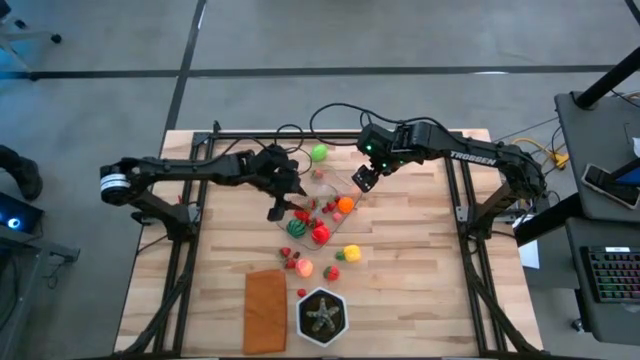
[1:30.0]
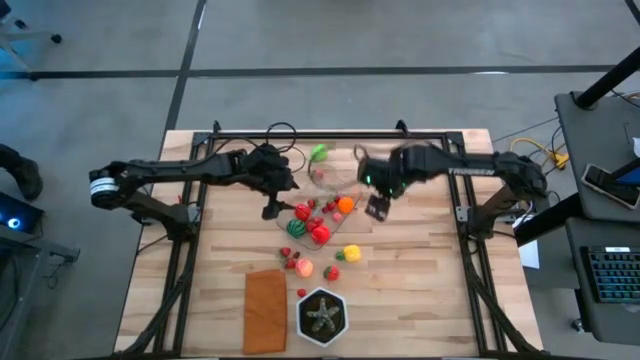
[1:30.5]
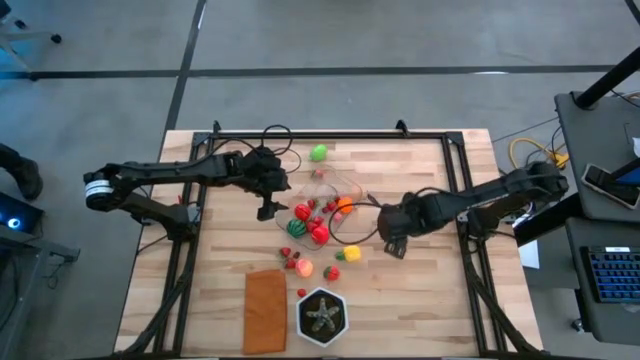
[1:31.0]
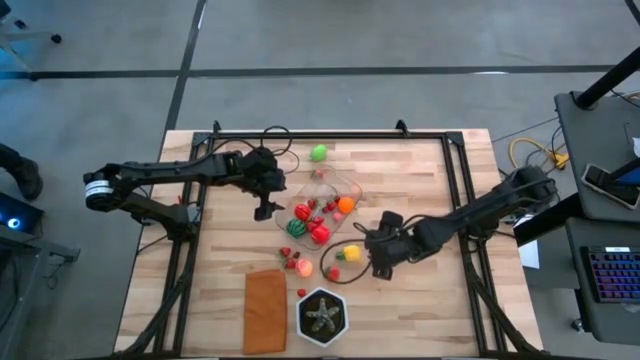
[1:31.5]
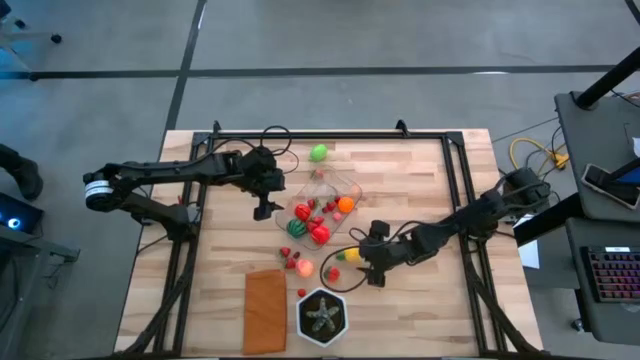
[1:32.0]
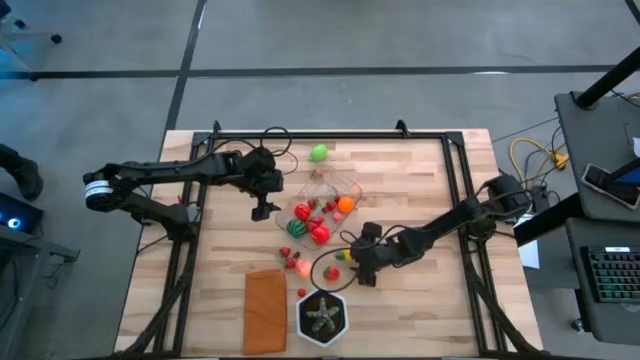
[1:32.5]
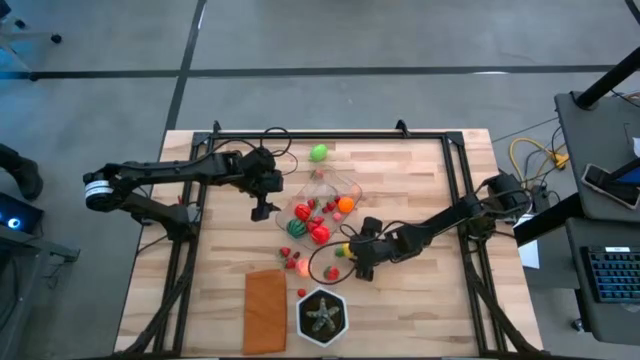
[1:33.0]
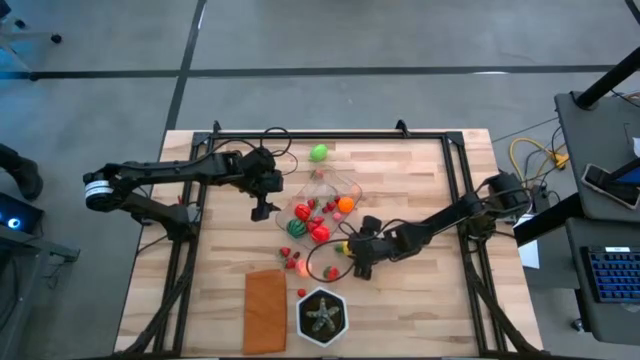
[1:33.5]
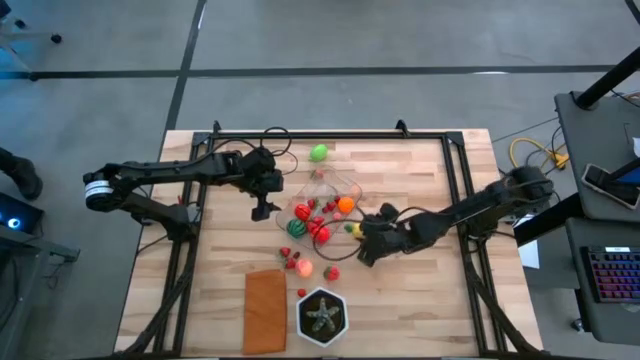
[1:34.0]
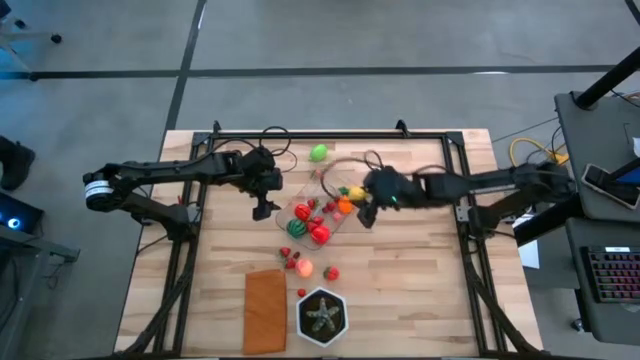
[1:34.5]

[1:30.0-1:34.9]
Task: Pick and placing Produce into tupperware
Put the yellow pineapple into the transparent bin

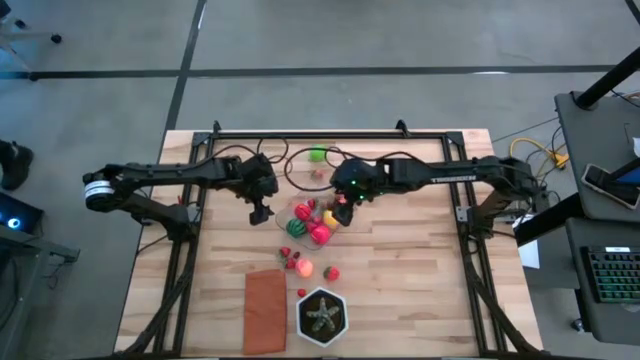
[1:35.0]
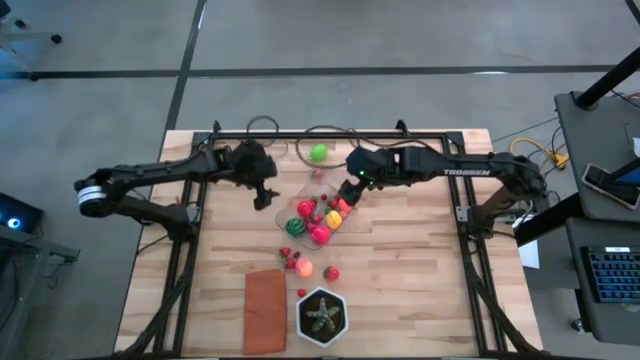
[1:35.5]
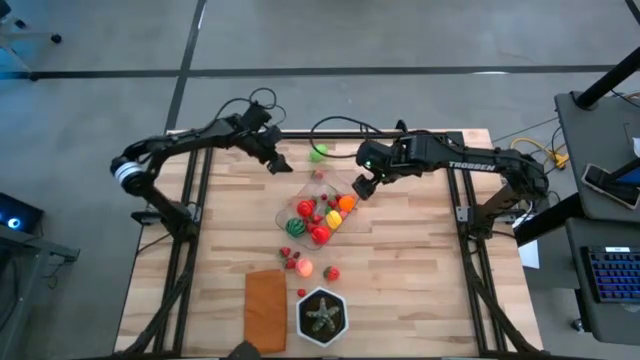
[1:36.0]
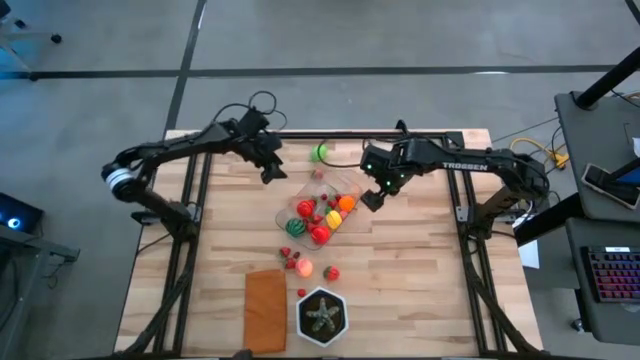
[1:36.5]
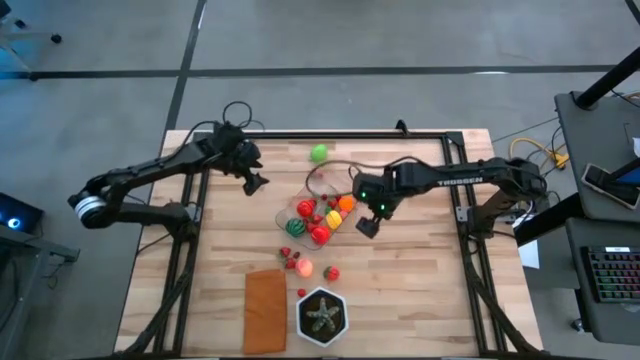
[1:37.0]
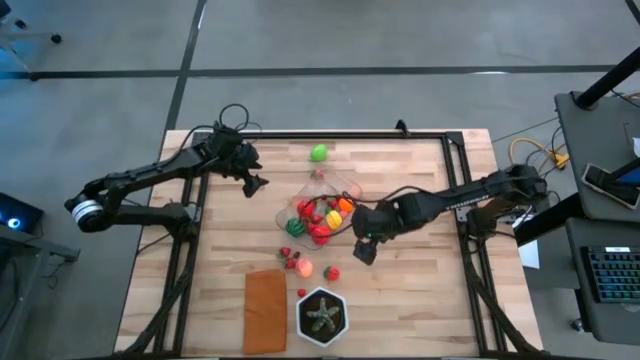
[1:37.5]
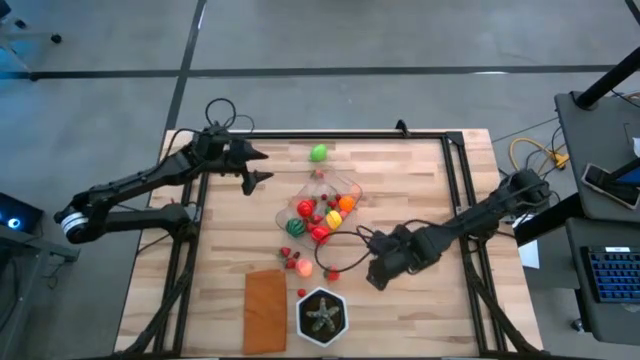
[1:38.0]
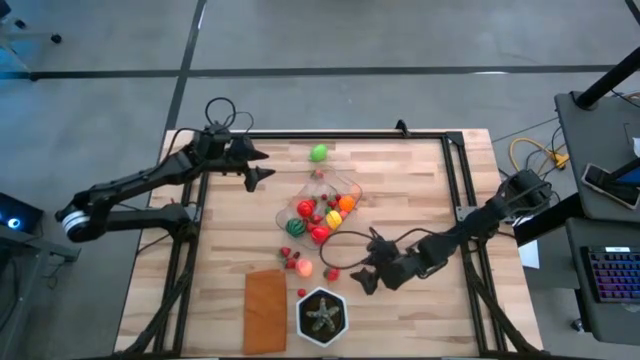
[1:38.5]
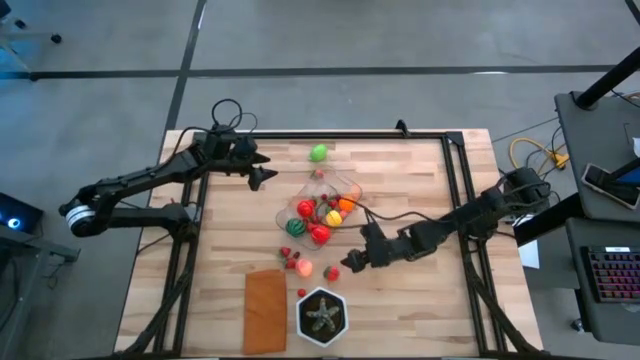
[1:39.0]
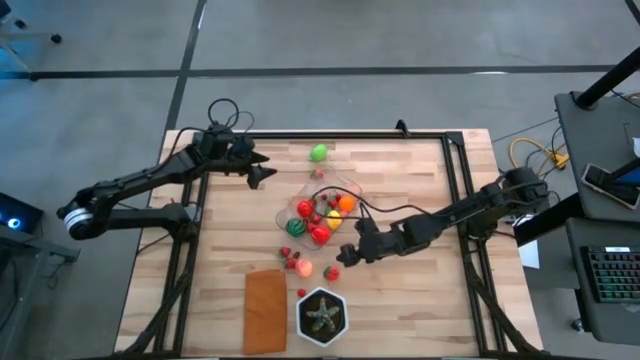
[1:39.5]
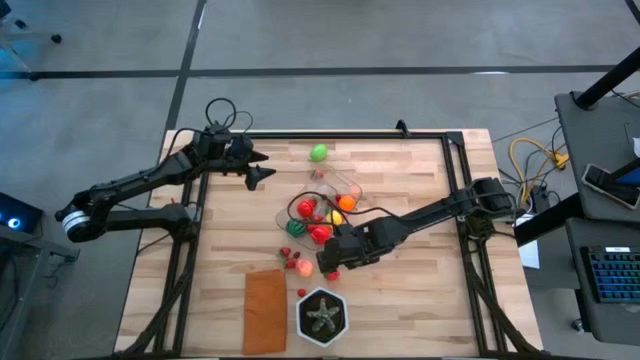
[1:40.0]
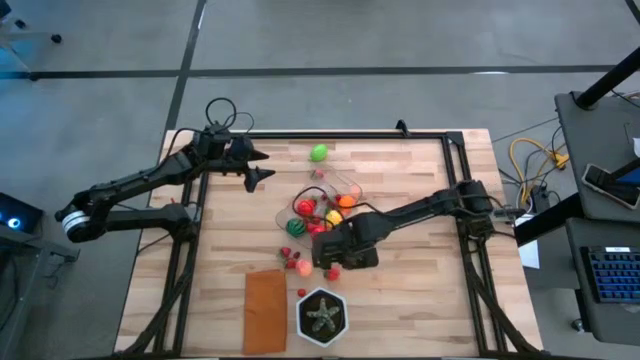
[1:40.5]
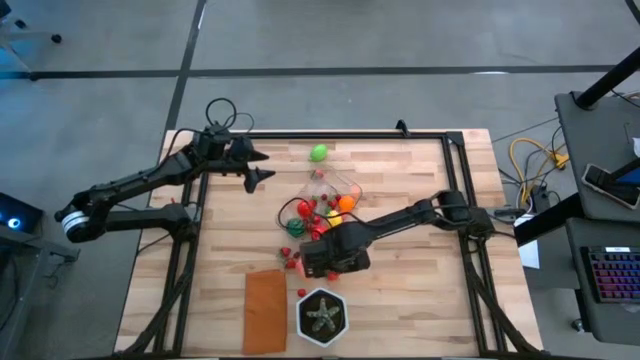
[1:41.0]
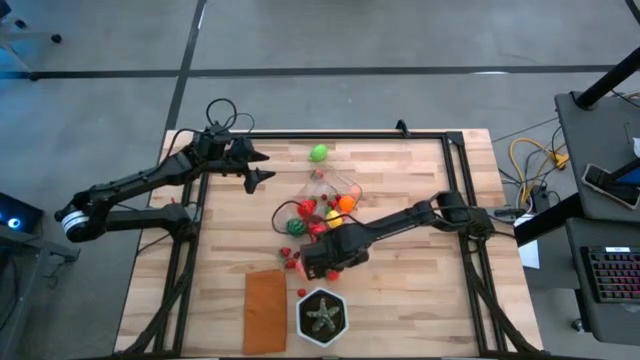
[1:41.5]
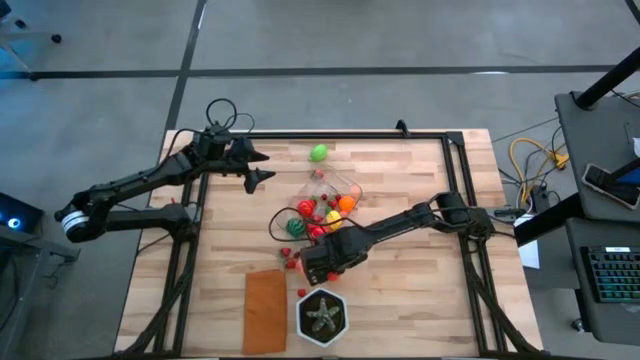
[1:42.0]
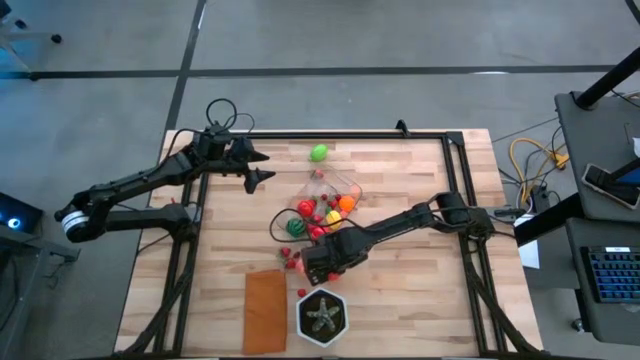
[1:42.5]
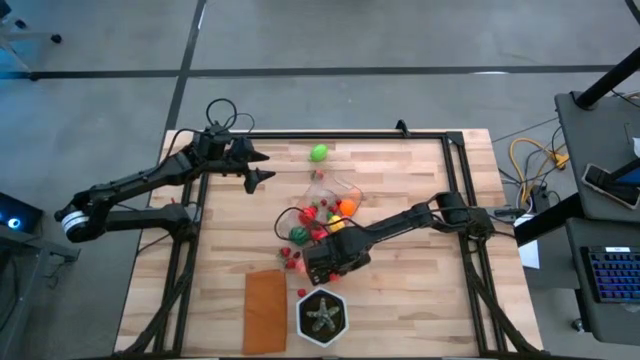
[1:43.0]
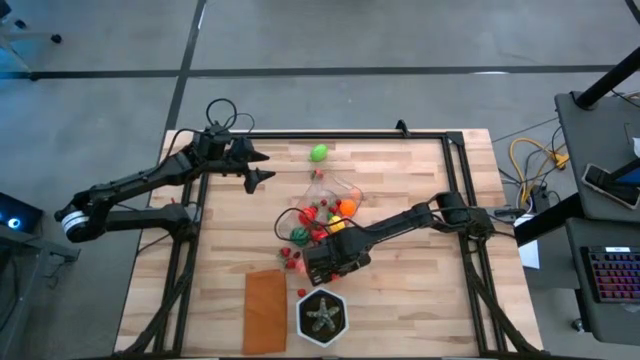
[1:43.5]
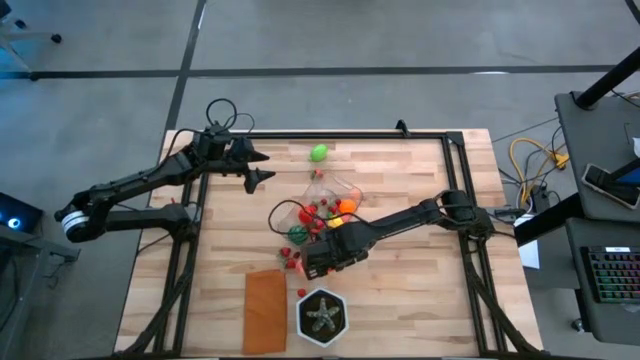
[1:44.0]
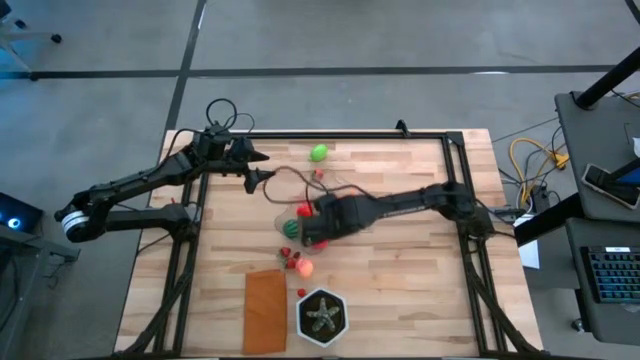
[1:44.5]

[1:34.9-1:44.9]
Put the red strawberry into the transparent bin

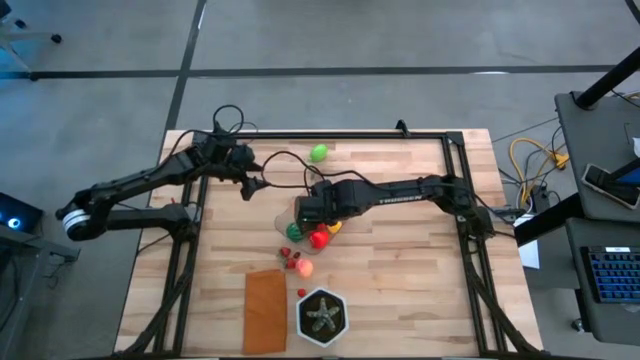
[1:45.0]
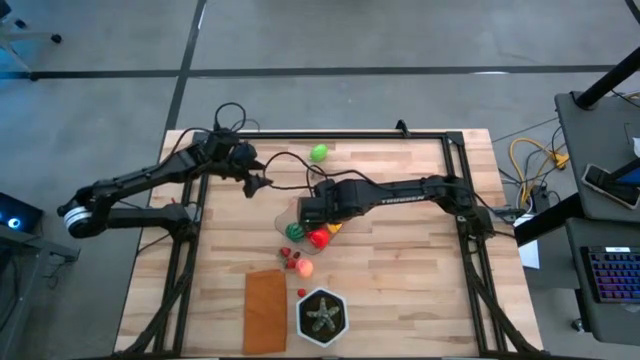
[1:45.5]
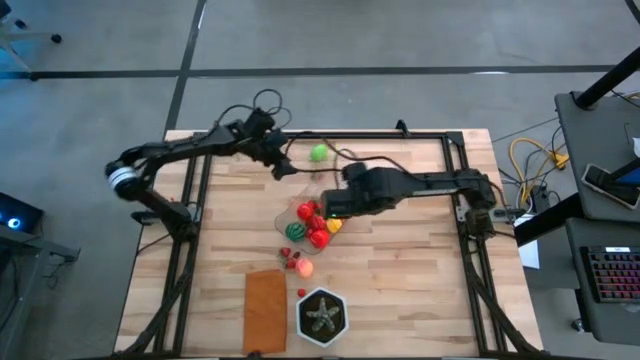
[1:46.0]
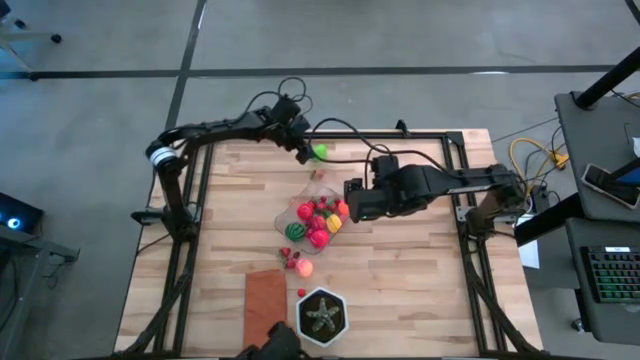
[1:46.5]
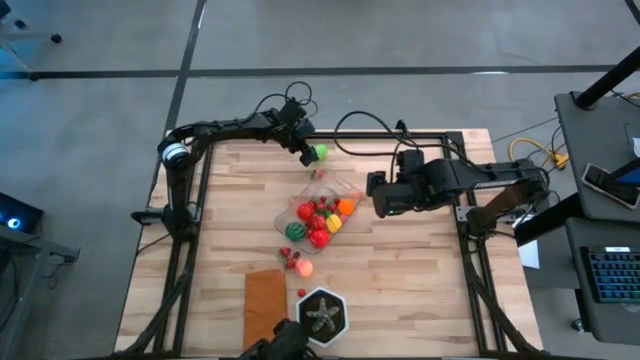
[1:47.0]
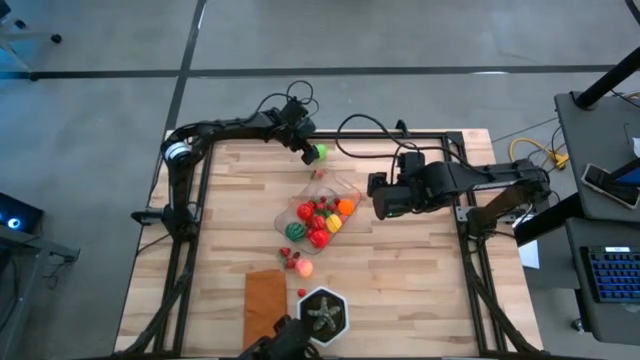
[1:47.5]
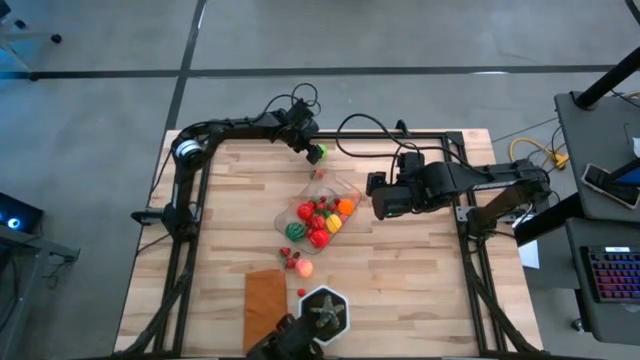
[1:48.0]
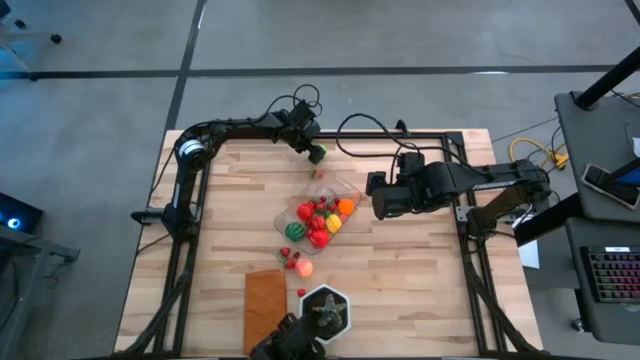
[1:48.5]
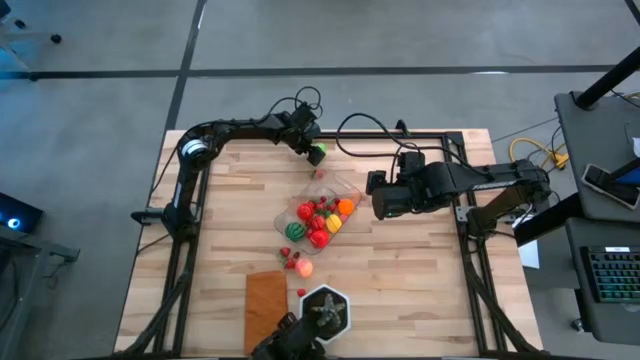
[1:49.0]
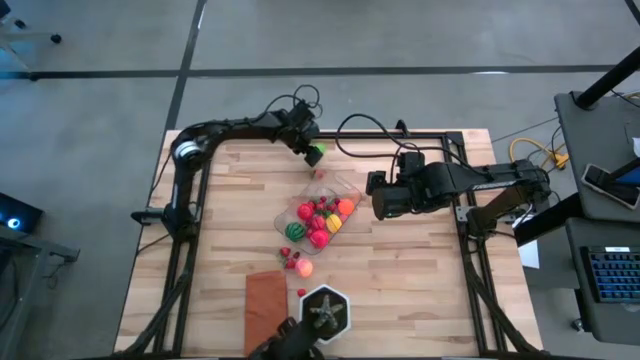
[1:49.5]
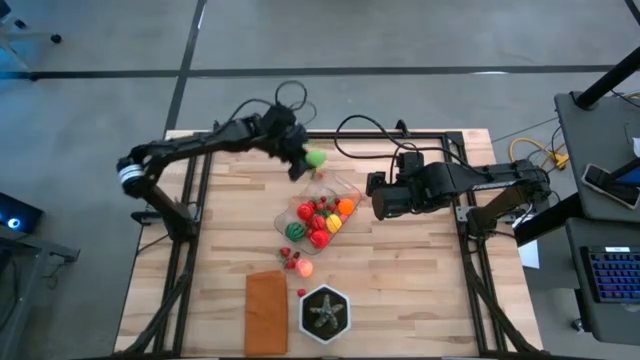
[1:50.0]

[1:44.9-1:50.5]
Put the green melon into the transparent bin

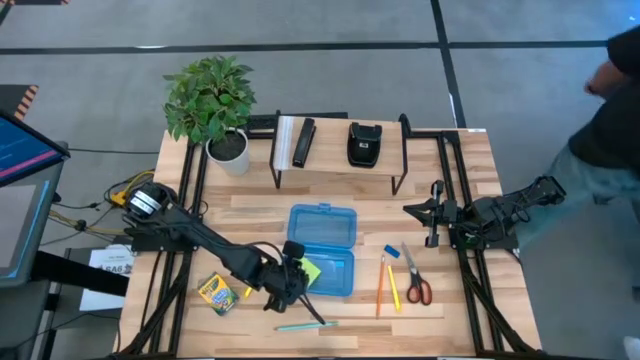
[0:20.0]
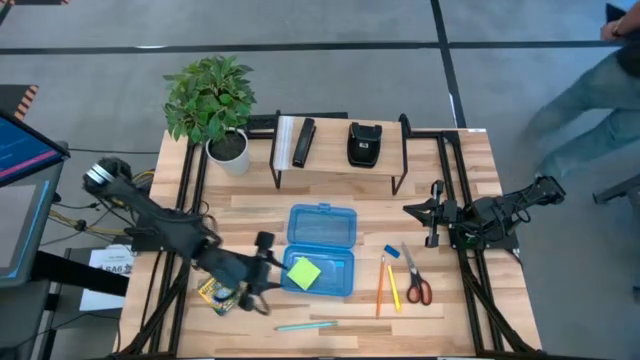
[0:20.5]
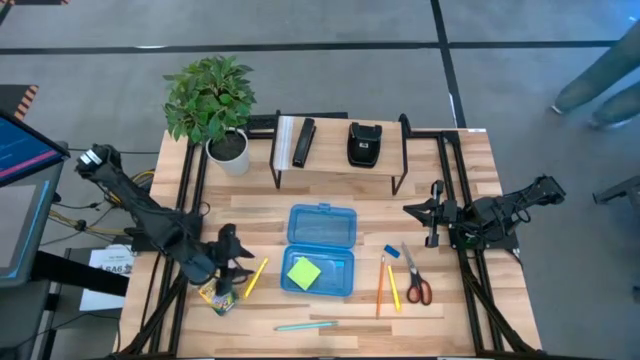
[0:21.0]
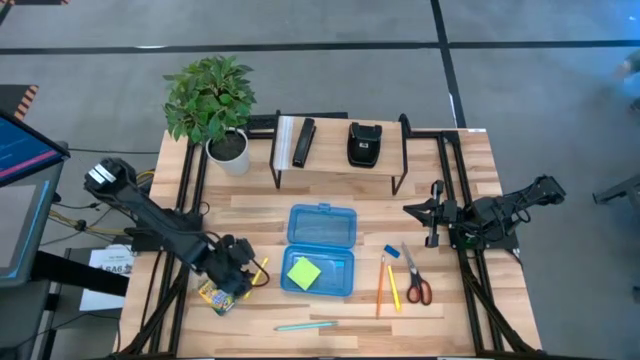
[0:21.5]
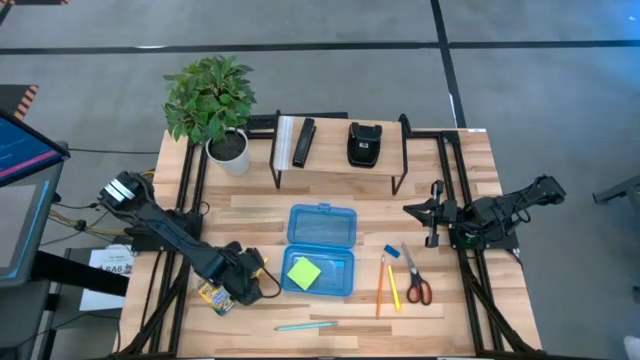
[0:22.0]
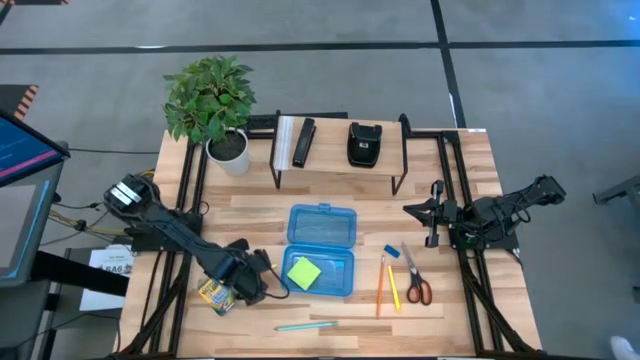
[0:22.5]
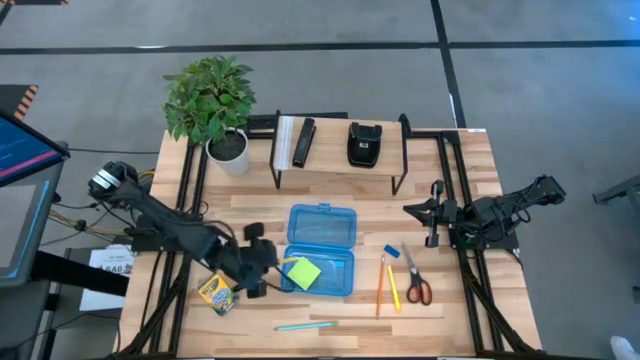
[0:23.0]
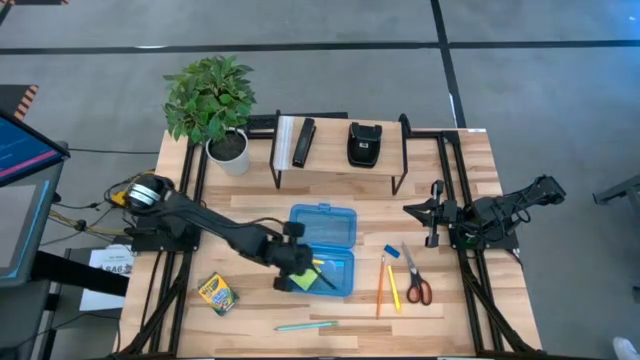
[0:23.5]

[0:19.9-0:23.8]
Task: Pack school essentials
Put the left yellow pen into the blue supply box
